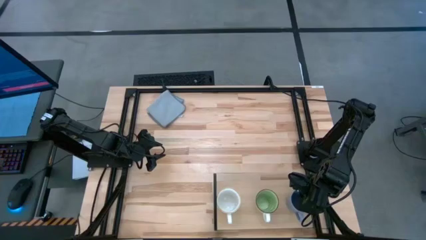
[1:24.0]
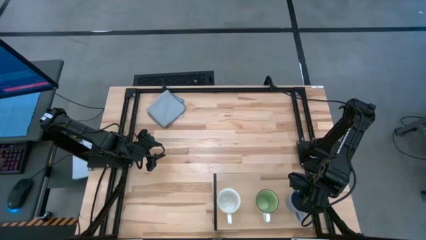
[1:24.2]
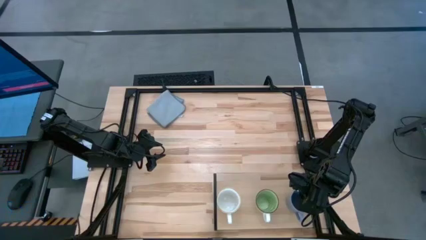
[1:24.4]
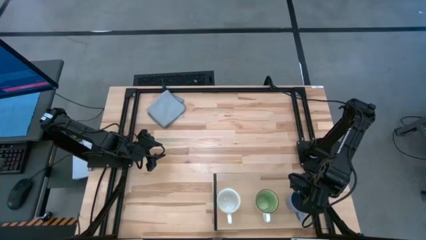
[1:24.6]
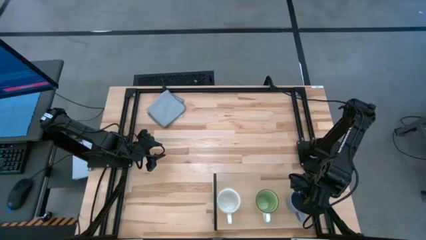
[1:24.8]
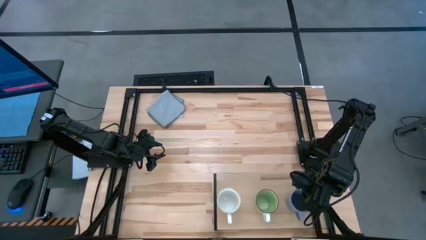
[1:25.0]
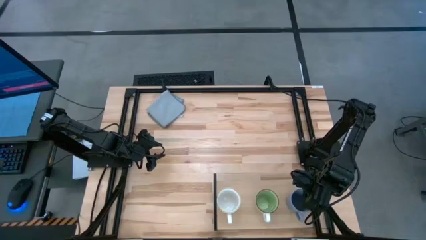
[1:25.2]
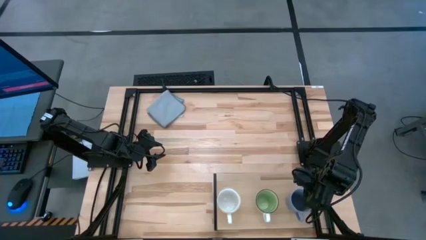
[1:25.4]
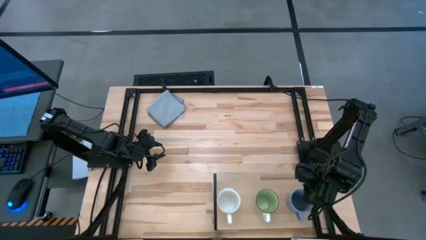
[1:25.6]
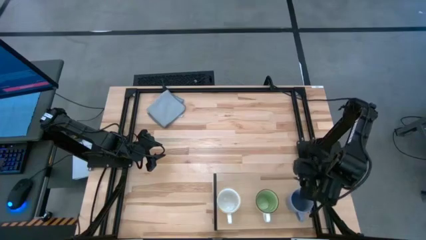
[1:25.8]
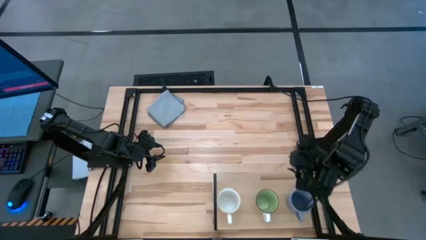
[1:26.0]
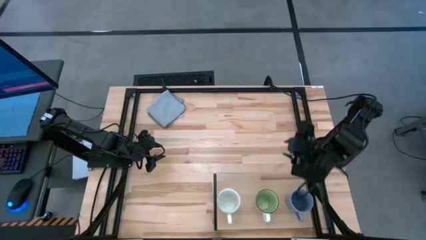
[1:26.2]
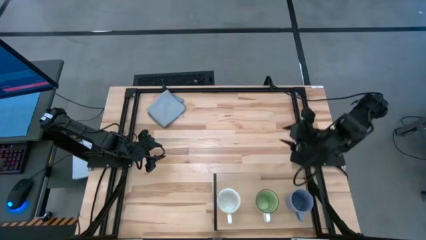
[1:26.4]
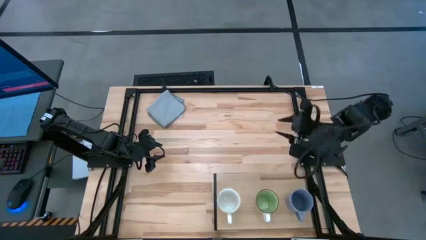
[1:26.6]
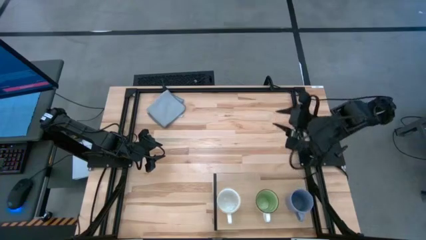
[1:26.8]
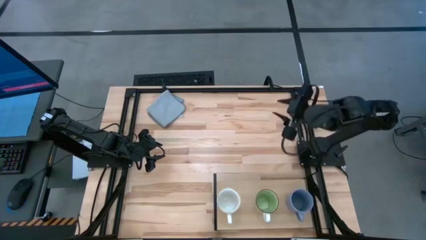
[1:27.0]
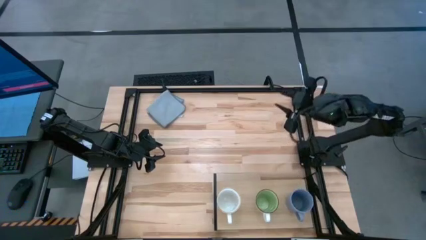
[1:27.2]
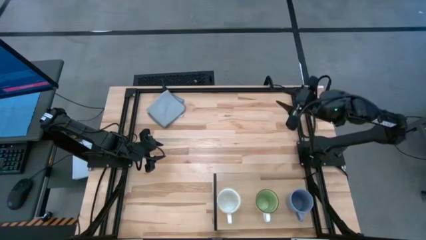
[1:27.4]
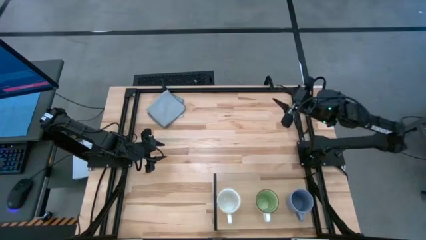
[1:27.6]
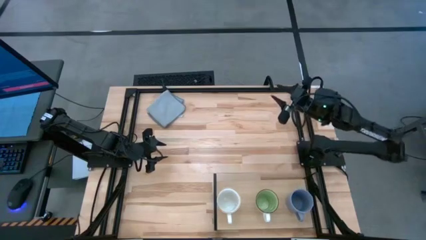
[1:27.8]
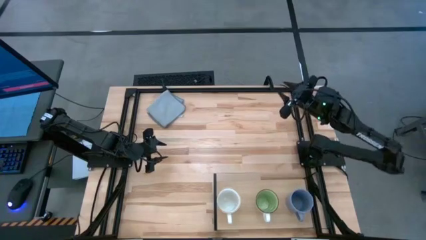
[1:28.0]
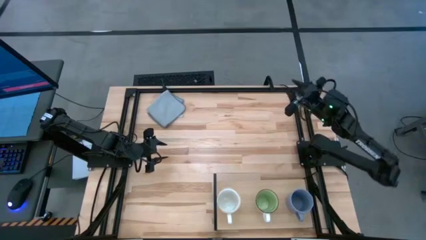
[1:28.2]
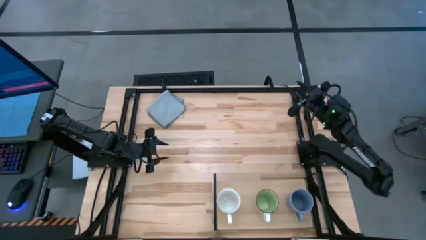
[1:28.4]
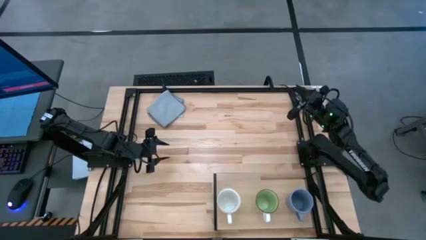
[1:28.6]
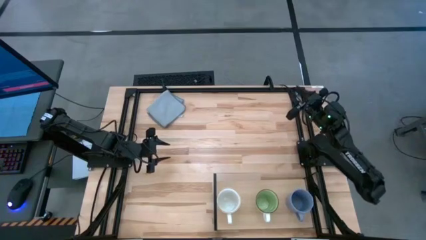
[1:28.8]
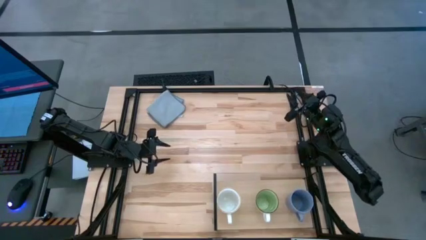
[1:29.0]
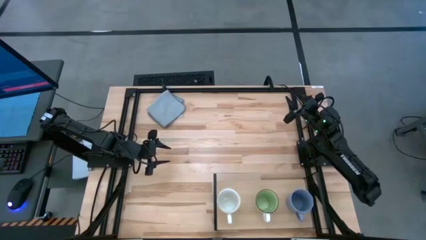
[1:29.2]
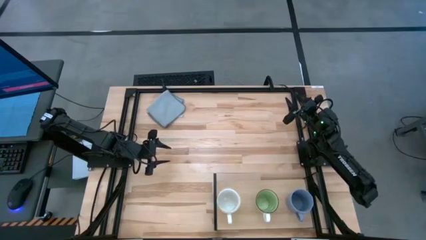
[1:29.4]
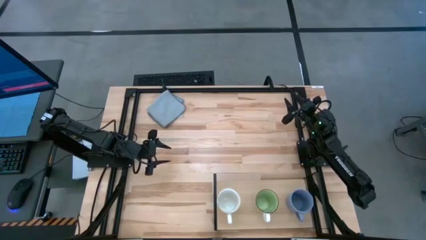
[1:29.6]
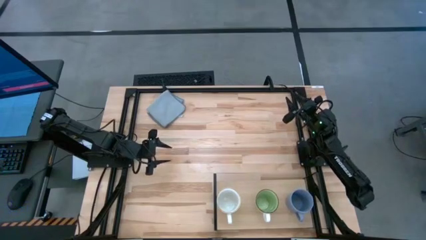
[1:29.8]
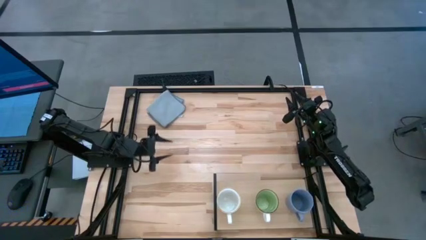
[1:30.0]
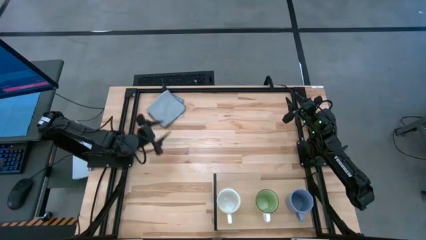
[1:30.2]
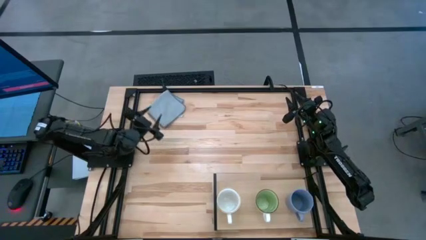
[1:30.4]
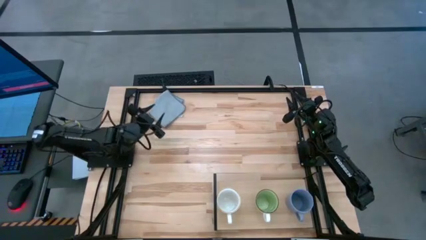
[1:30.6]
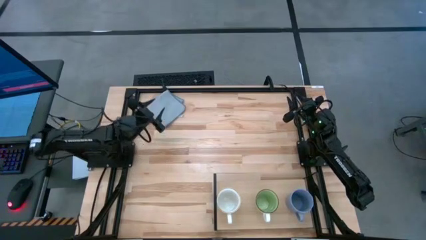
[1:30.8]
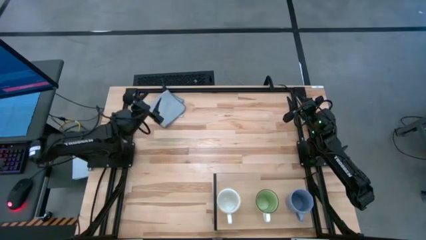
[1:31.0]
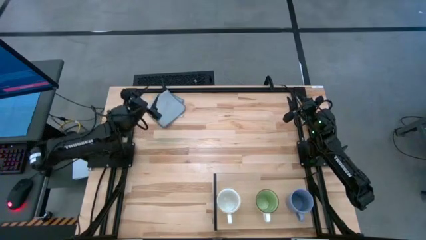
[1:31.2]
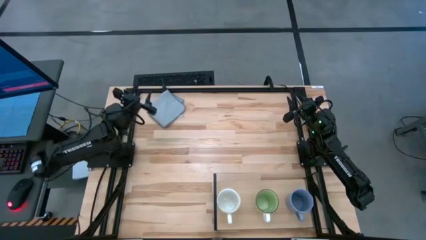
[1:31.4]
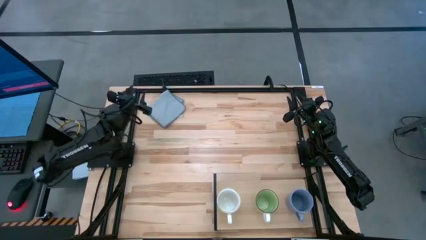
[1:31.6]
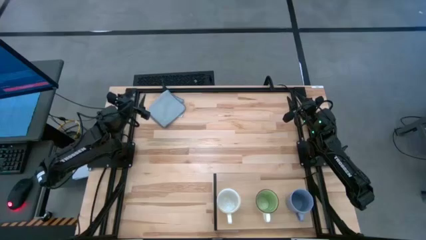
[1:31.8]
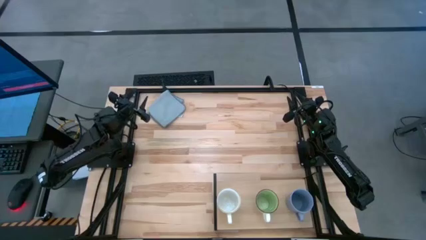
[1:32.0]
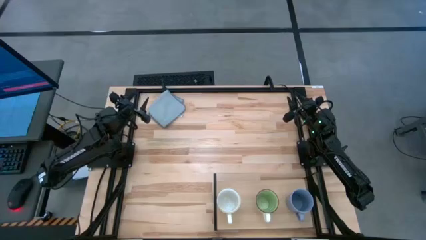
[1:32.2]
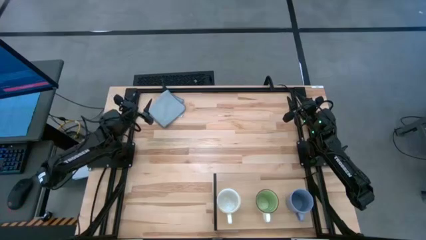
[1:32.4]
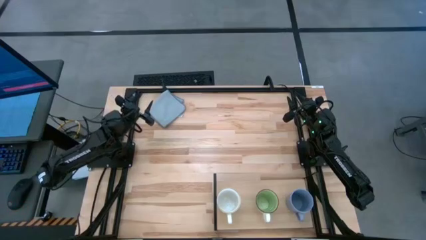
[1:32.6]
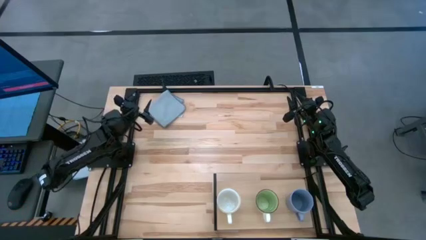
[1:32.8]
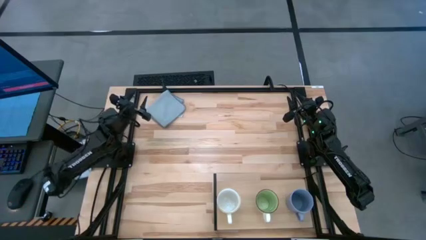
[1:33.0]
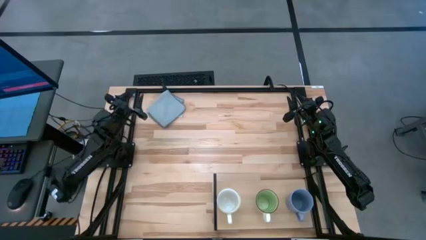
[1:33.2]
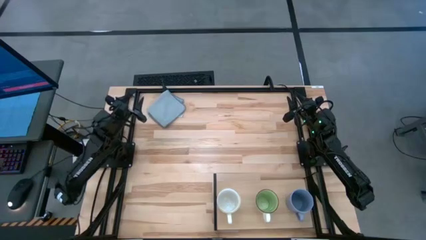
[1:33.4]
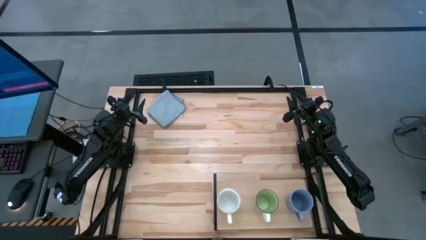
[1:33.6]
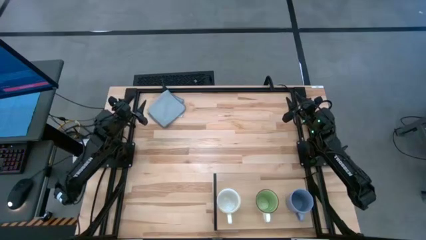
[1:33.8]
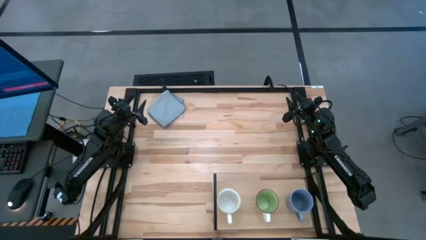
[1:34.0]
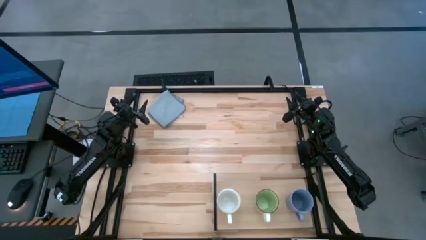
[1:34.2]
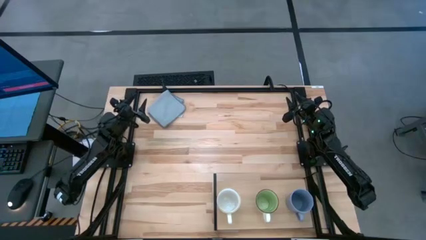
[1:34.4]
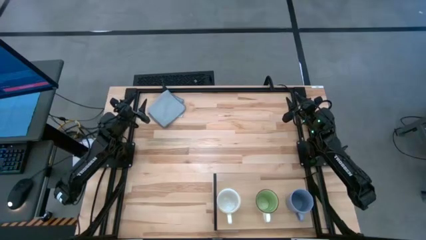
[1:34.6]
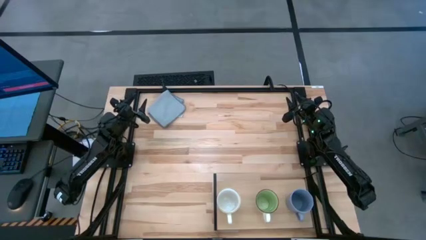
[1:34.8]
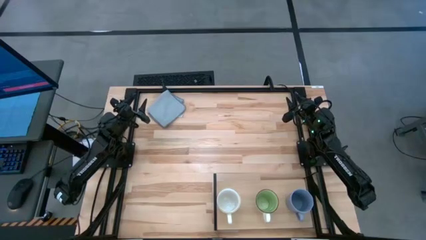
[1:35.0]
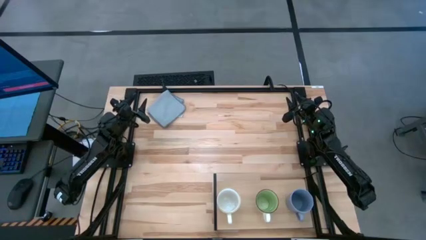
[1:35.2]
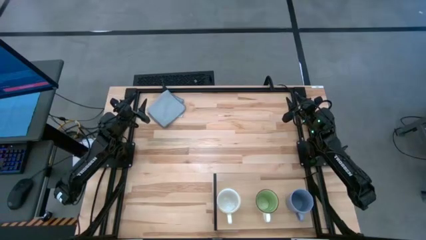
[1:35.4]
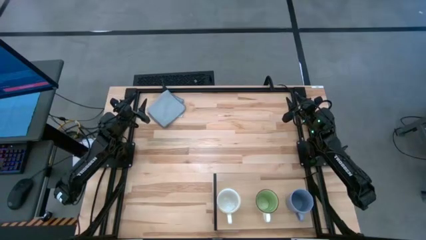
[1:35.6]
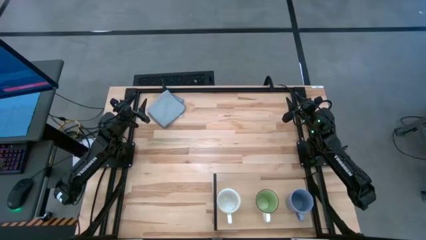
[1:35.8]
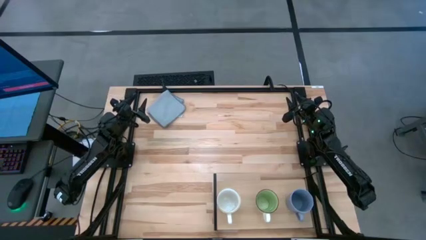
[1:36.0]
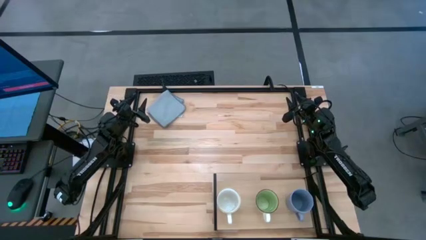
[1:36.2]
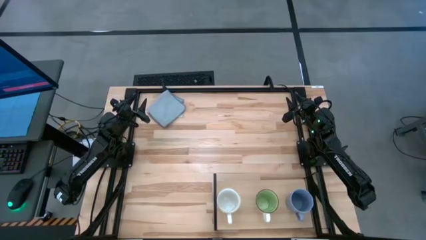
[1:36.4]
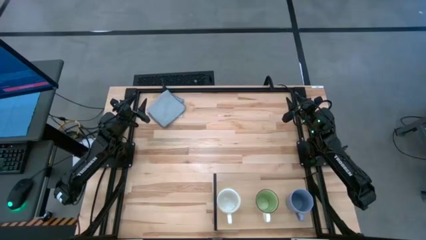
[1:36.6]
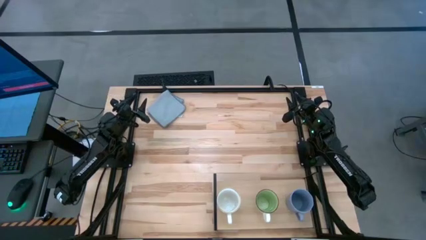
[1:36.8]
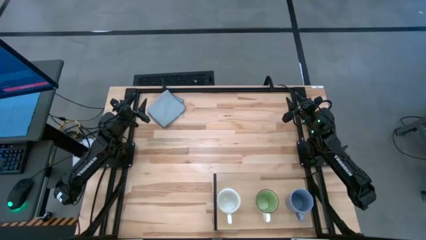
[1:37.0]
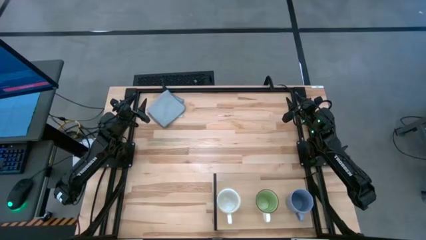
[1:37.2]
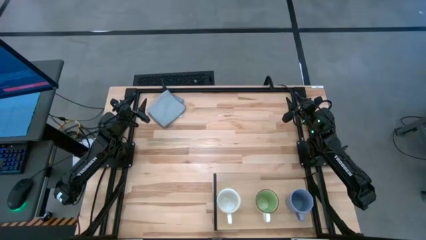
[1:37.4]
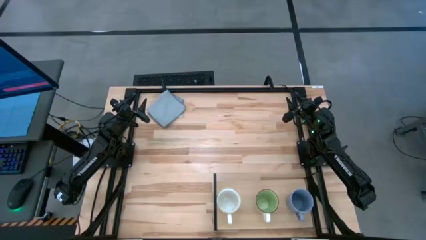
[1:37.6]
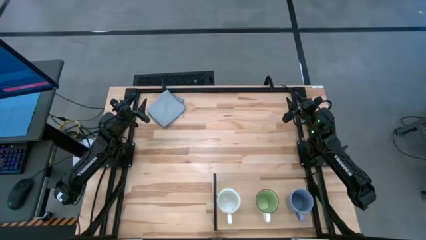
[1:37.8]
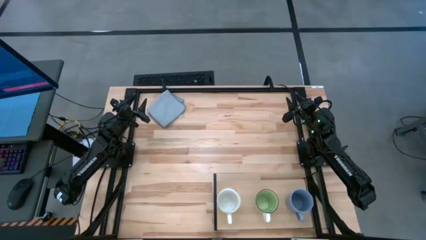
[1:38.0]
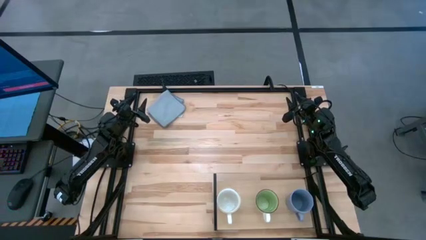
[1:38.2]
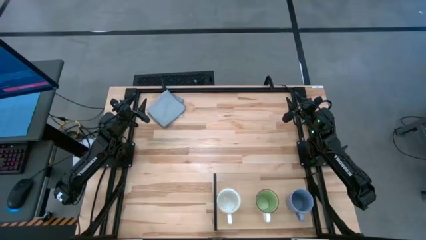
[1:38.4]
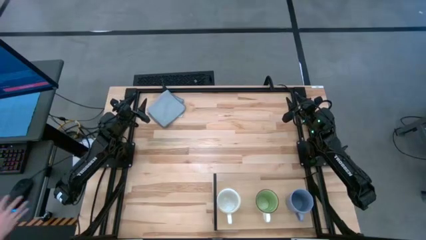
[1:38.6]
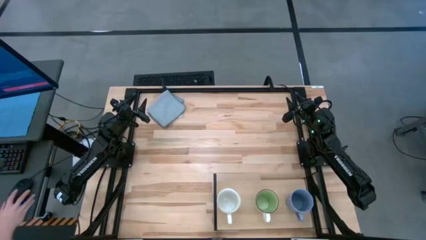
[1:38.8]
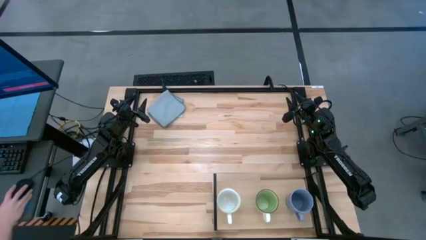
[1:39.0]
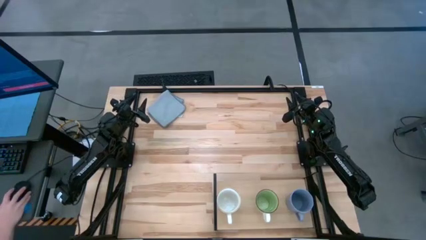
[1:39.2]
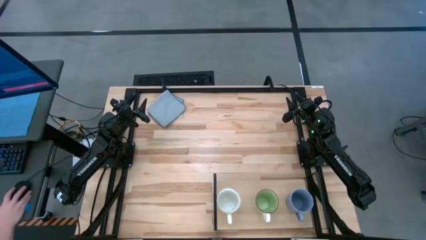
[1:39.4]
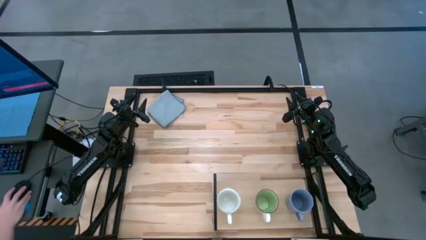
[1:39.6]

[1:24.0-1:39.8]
Task: Stack small to large cups/mugs on shelf
Return to Home Position
